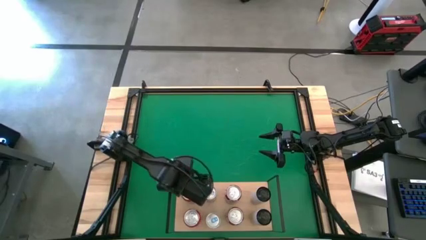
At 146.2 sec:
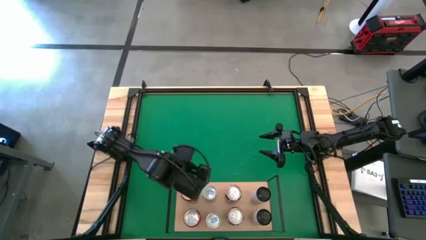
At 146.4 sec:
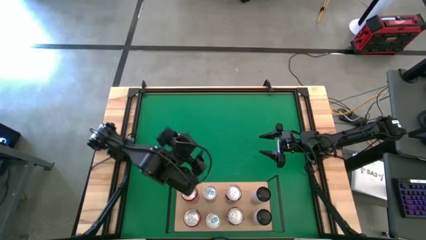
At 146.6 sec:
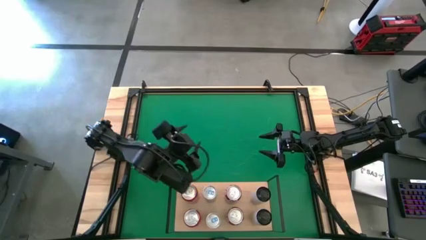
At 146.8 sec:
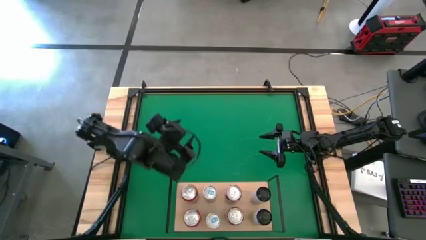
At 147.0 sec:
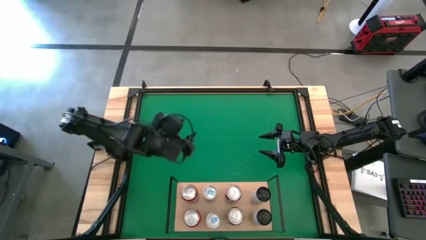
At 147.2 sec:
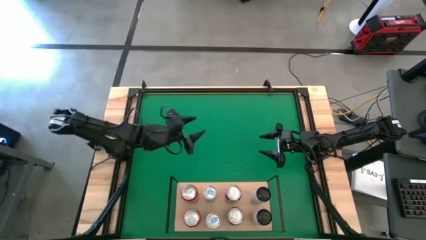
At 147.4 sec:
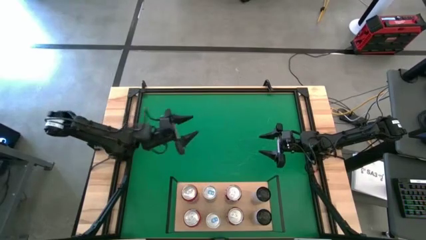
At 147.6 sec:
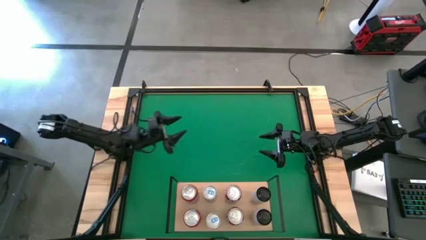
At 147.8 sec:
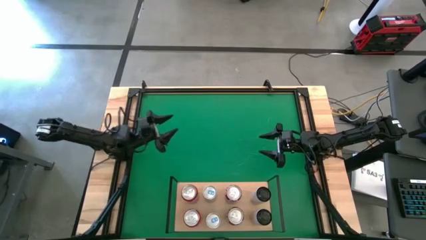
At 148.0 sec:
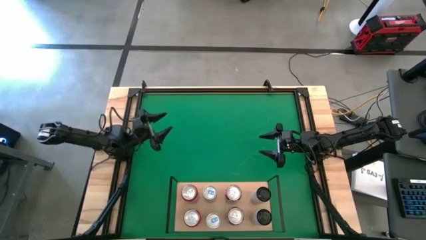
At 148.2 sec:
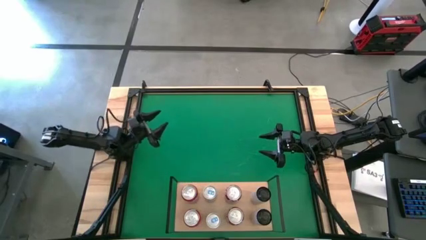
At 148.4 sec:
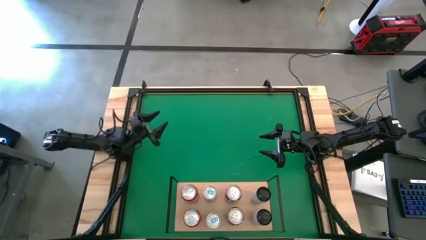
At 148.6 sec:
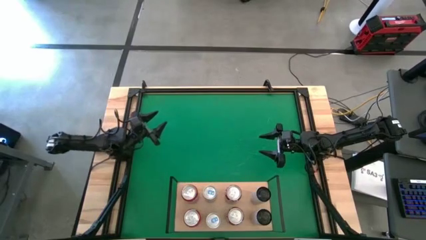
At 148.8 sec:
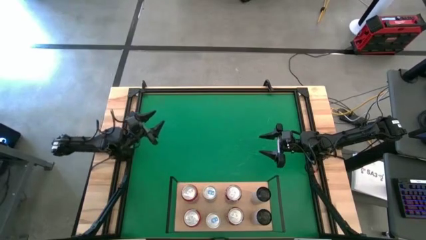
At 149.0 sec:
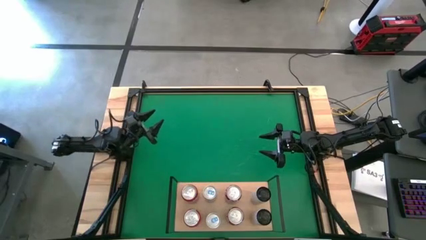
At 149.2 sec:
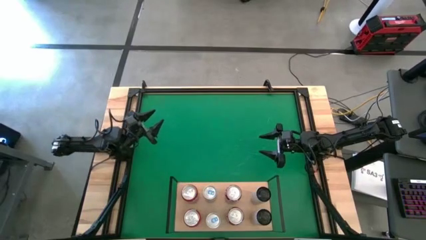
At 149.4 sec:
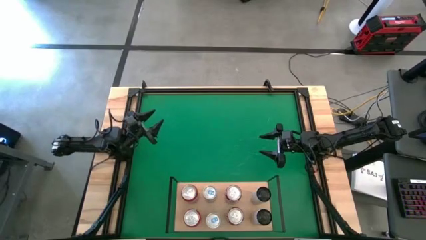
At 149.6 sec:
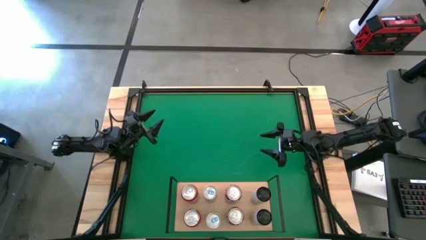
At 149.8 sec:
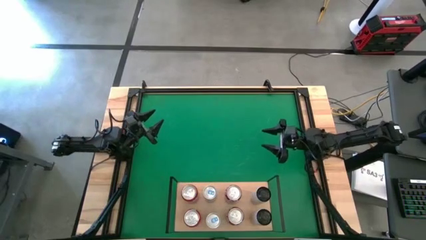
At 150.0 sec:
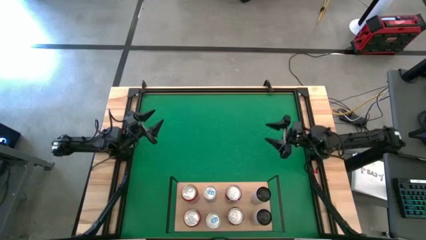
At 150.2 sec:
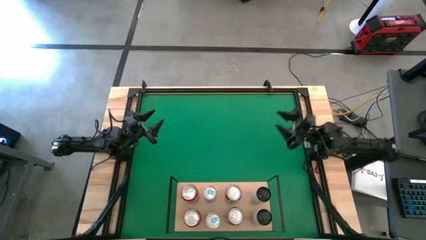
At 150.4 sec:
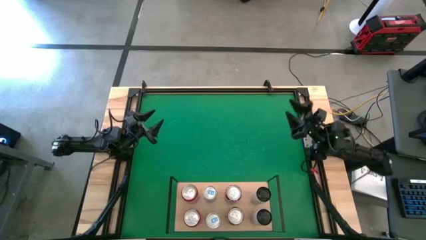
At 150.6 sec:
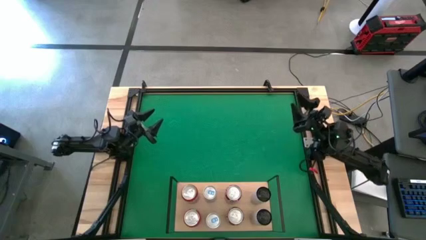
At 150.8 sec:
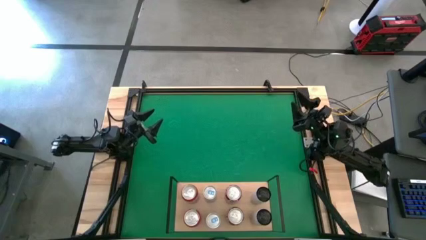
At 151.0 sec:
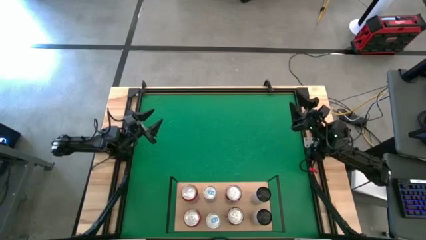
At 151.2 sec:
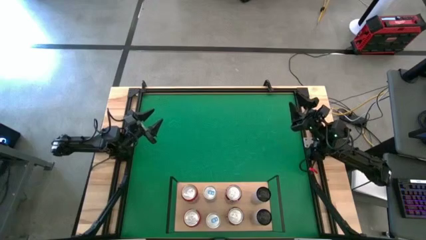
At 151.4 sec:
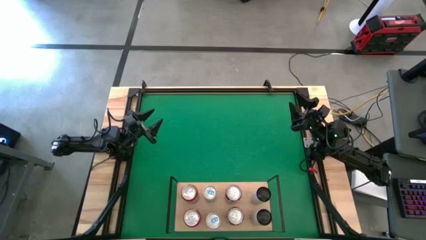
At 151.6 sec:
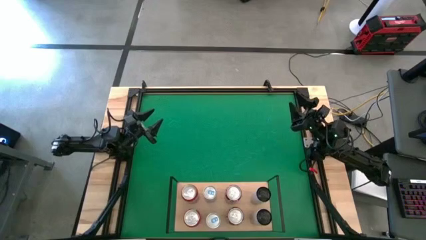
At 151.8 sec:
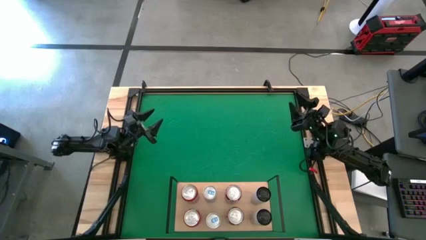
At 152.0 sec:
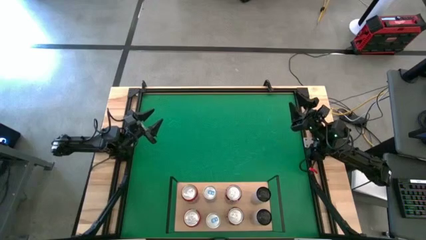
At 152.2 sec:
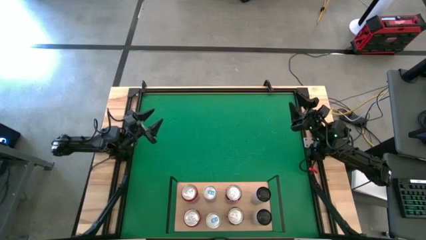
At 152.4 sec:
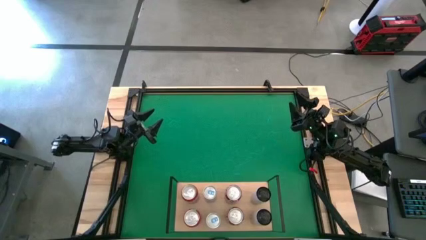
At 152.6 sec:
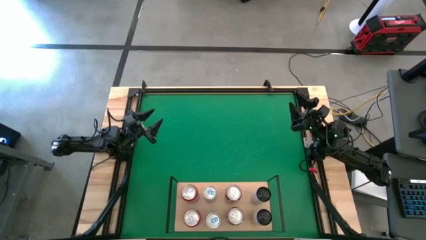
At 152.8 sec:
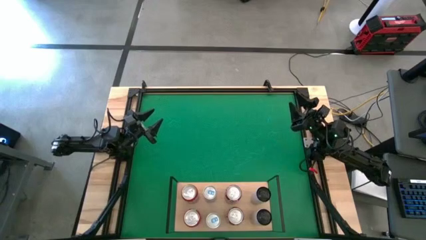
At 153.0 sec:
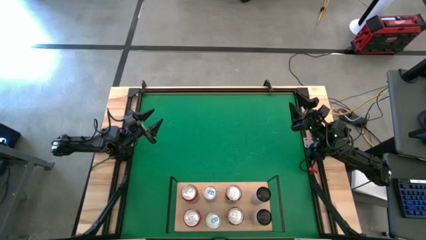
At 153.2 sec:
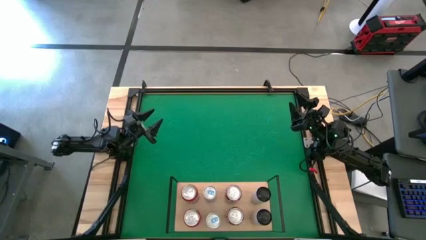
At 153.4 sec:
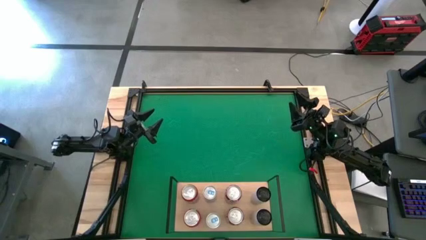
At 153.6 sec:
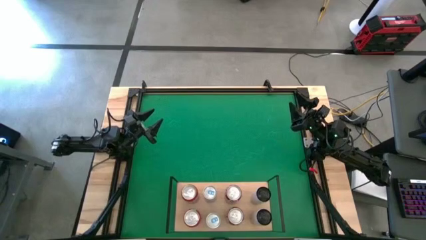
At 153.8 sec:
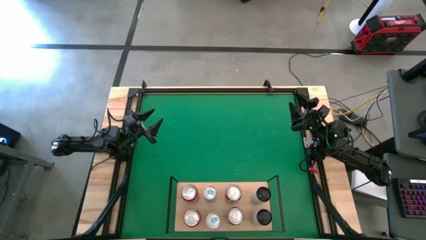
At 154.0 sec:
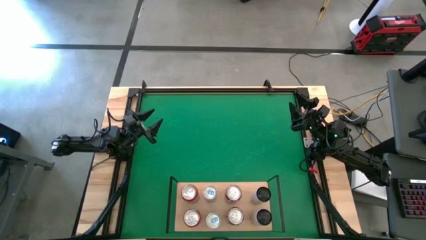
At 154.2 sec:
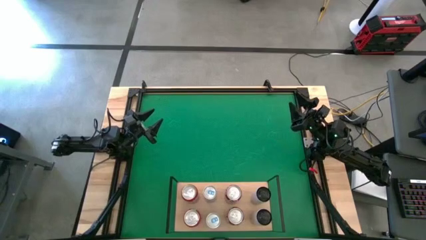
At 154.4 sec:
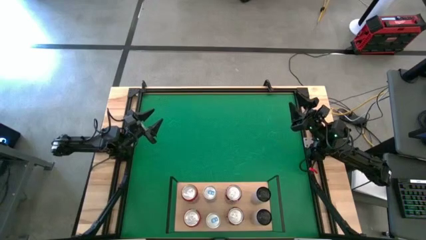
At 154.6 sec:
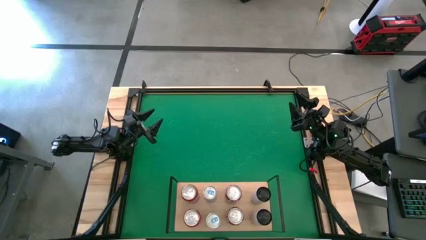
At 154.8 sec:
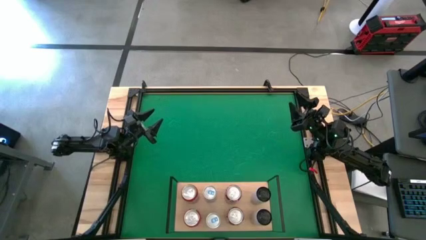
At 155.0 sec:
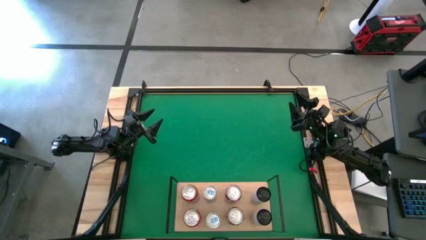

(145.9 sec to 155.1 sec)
Task: Place canned beverage on shelf
Return to Home Position

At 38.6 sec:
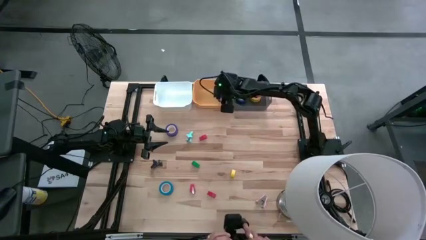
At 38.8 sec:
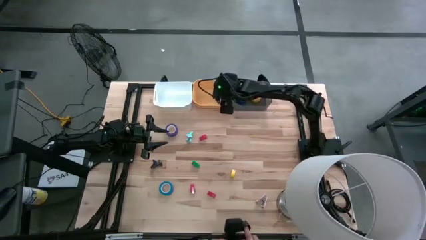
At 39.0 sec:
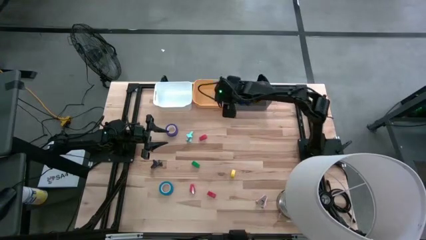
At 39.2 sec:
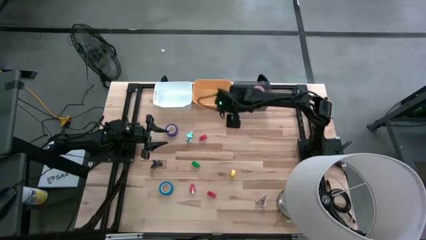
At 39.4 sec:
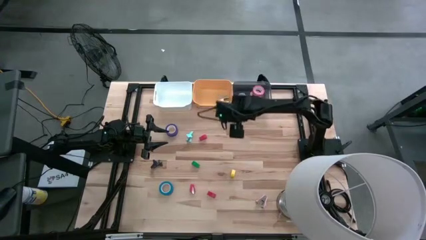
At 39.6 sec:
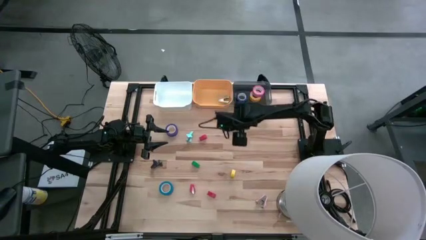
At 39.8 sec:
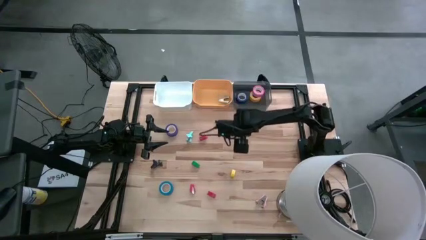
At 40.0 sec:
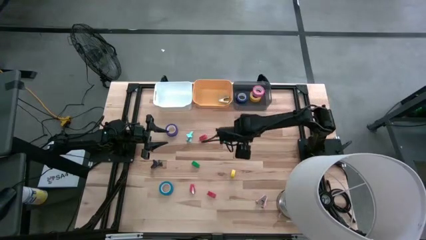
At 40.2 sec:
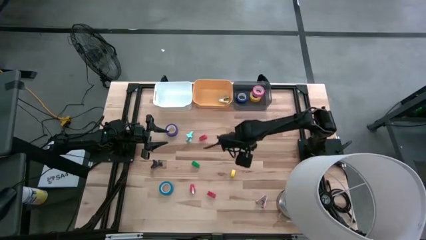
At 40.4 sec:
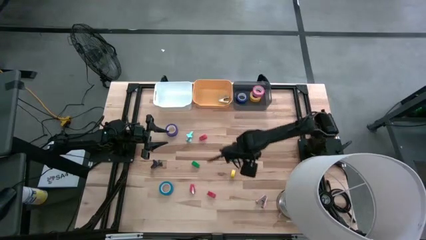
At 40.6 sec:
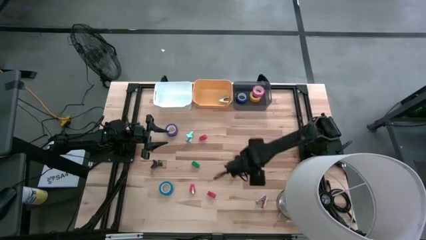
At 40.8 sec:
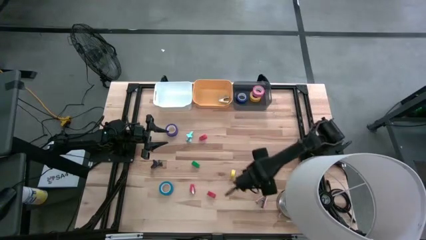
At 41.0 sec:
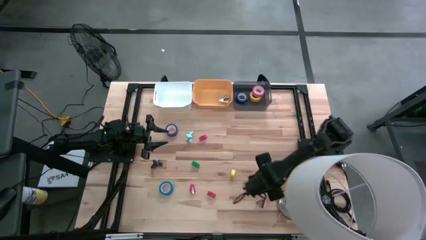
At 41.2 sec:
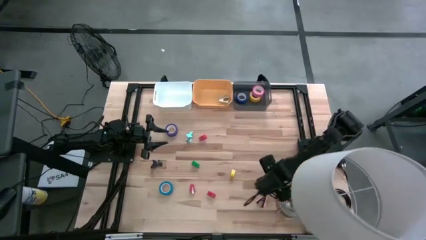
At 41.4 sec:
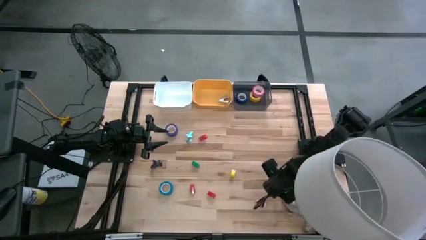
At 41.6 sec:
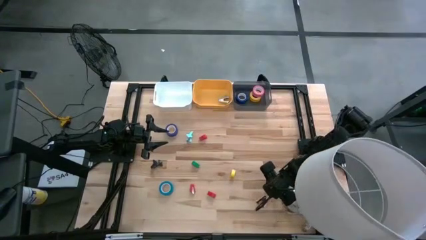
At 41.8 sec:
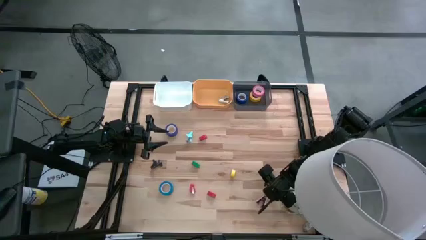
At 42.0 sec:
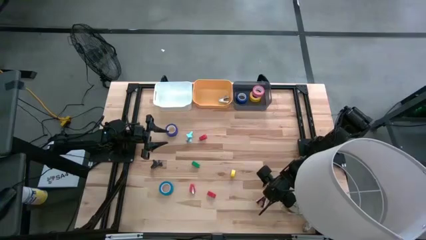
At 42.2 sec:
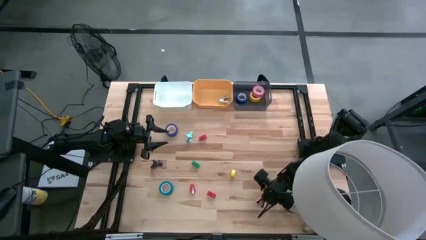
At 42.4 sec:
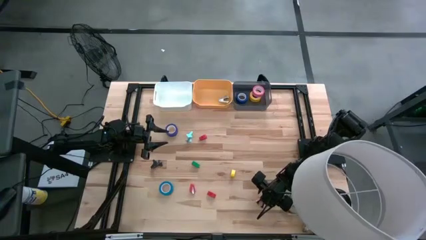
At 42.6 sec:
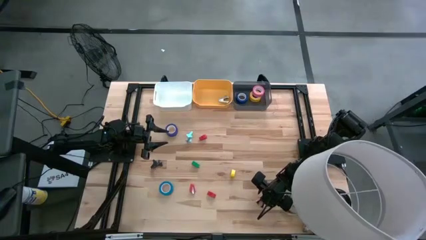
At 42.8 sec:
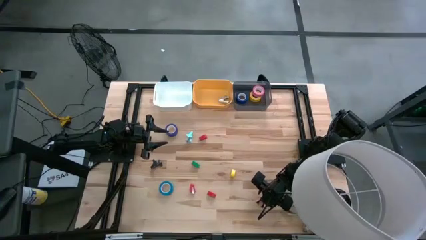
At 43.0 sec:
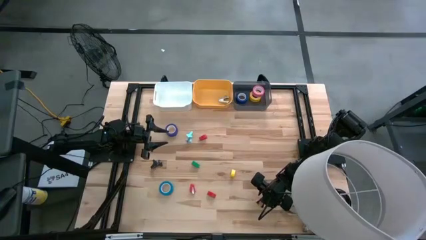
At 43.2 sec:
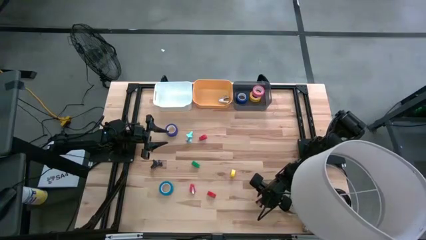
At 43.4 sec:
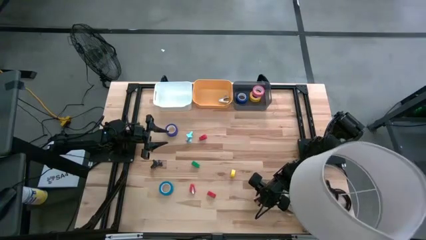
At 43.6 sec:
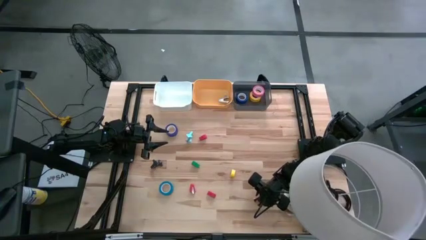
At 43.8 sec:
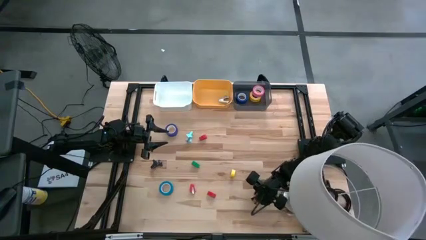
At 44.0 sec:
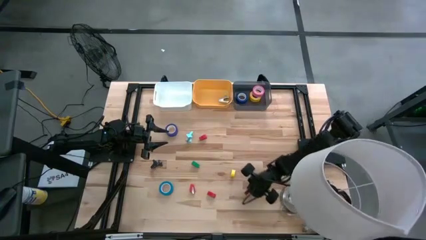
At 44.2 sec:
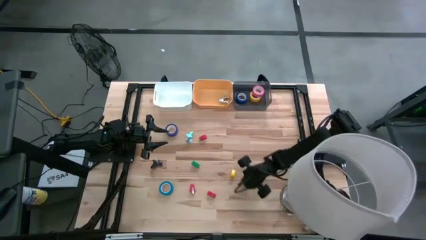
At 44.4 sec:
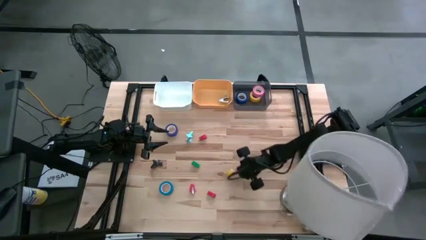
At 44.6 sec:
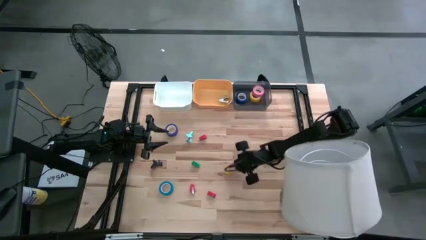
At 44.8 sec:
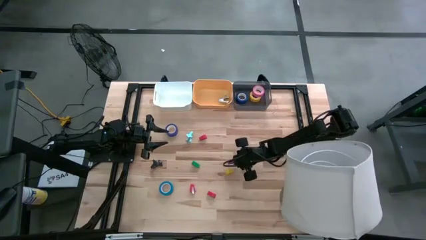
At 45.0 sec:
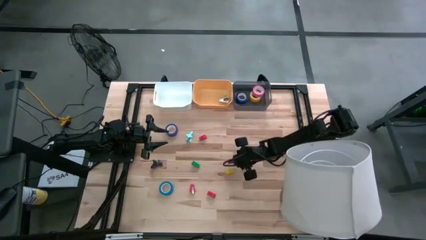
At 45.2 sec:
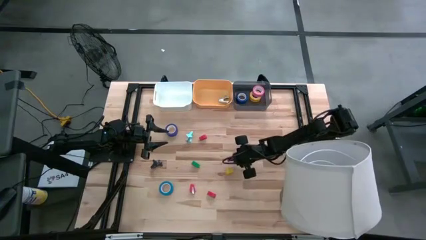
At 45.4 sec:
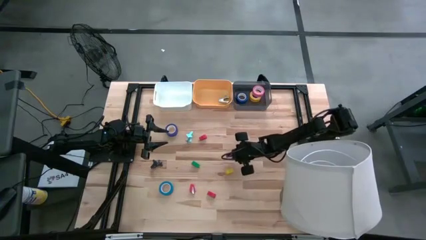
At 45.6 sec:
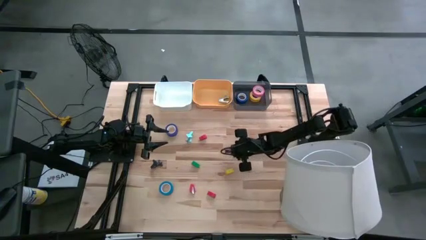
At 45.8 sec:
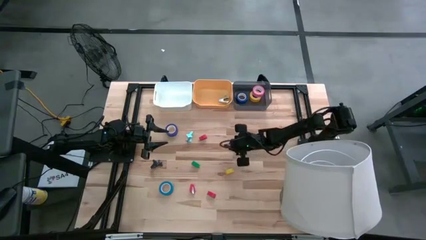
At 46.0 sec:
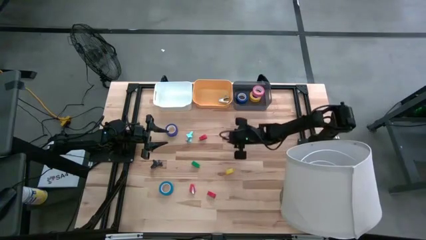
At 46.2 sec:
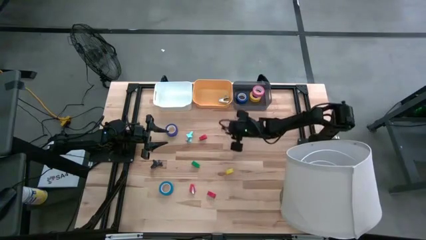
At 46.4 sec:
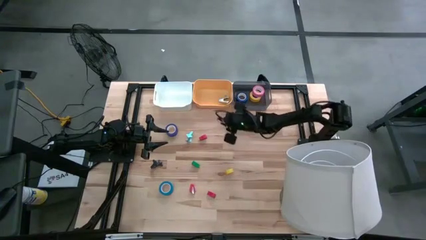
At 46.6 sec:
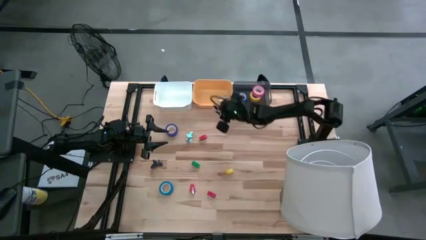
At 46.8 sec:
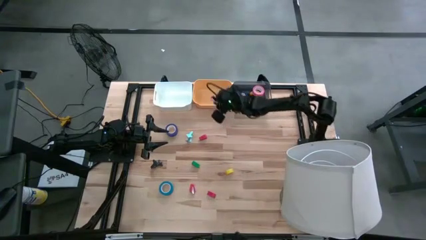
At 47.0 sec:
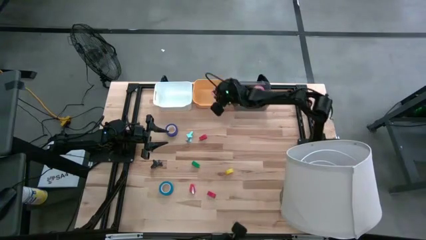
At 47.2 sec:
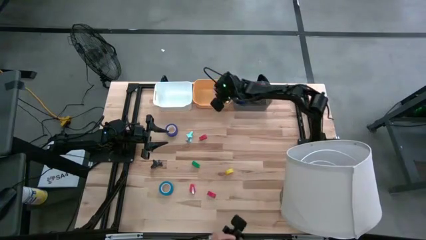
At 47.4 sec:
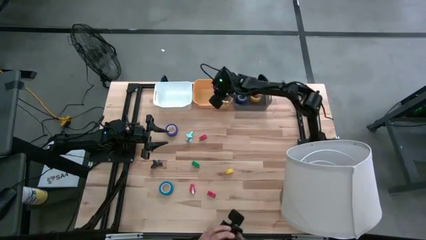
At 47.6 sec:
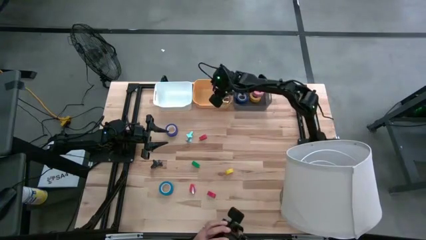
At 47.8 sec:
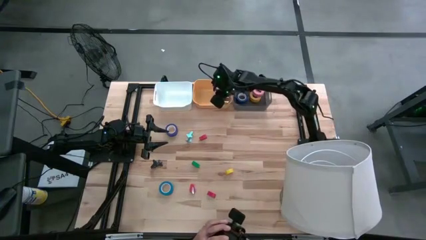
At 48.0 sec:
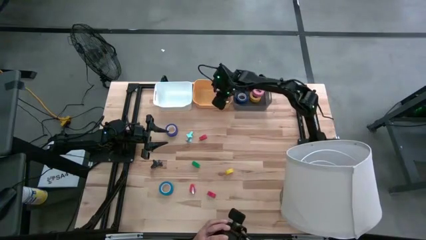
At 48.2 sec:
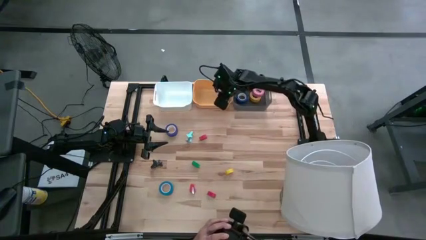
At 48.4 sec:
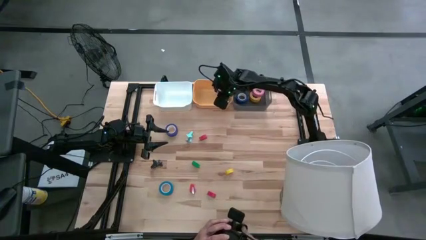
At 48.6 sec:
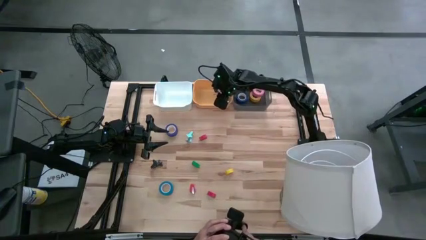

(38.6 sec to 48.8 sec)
Task: Pick and place Stapler, Stapler remover, tape
Put the pink staple remover into the orange bin
